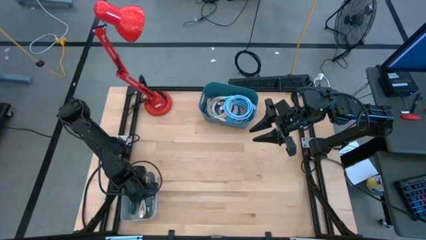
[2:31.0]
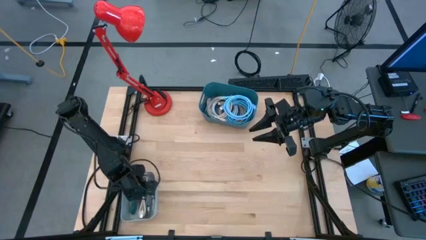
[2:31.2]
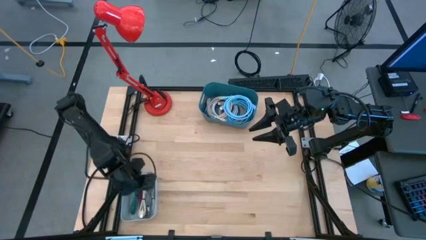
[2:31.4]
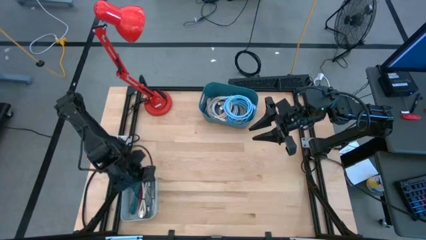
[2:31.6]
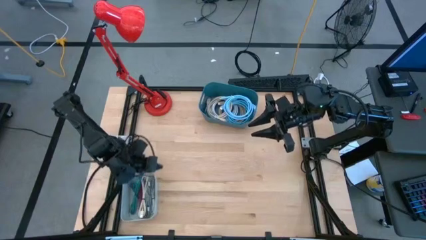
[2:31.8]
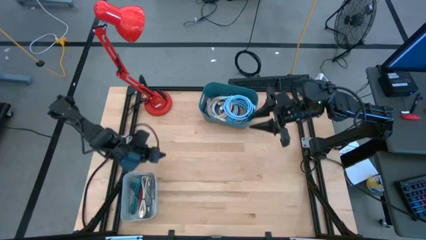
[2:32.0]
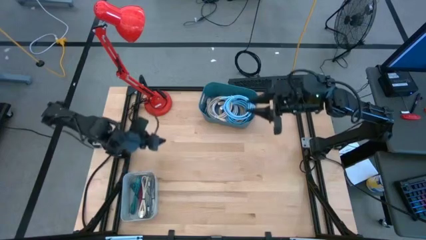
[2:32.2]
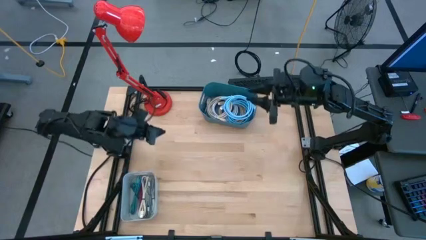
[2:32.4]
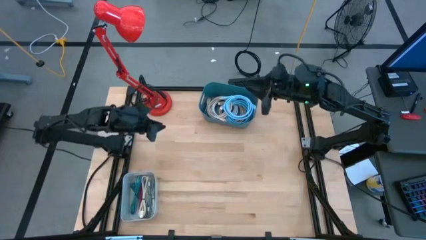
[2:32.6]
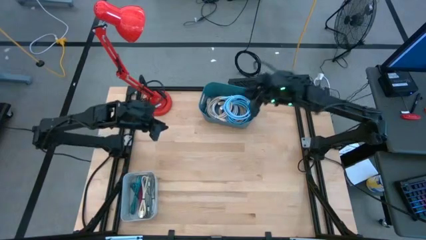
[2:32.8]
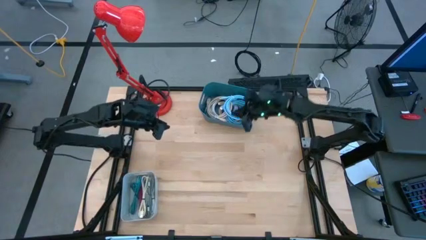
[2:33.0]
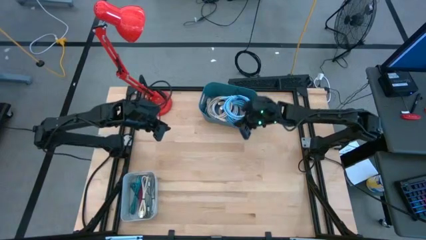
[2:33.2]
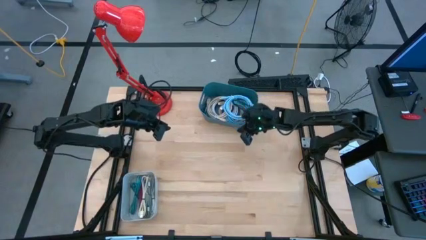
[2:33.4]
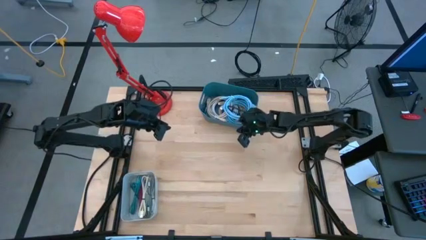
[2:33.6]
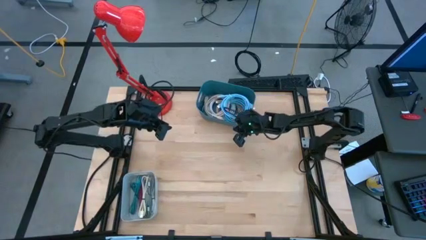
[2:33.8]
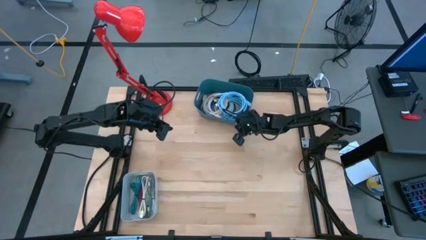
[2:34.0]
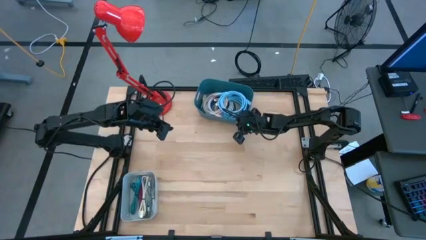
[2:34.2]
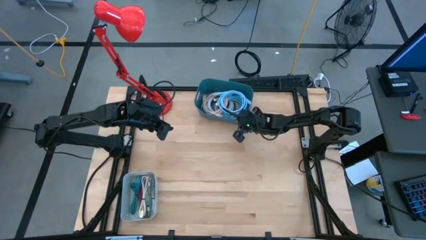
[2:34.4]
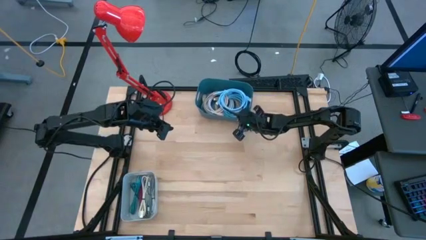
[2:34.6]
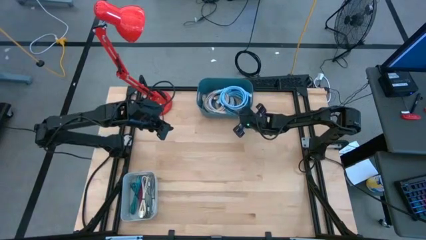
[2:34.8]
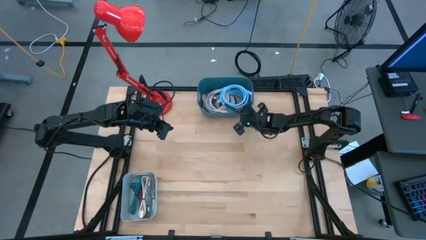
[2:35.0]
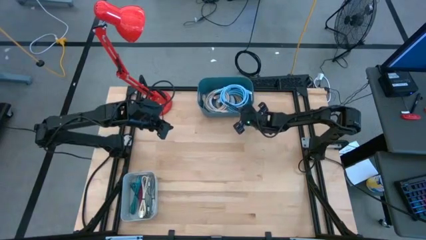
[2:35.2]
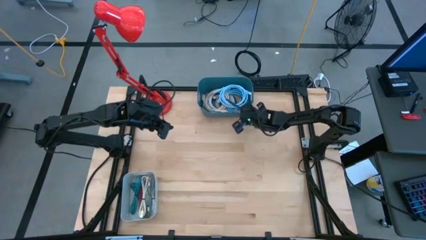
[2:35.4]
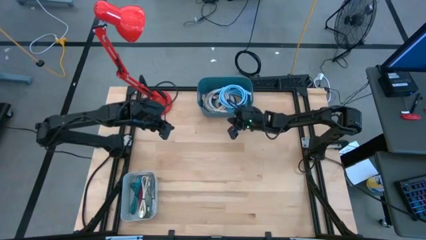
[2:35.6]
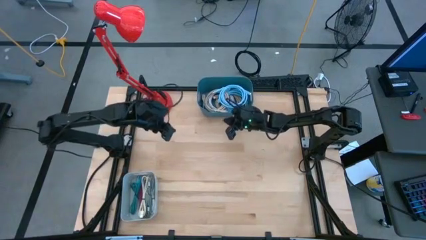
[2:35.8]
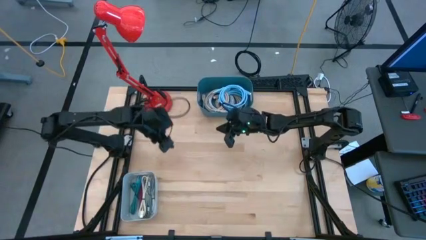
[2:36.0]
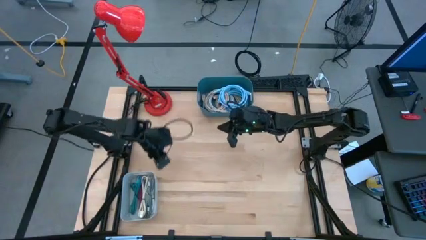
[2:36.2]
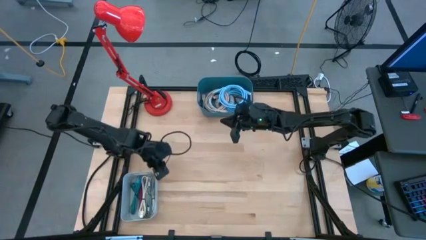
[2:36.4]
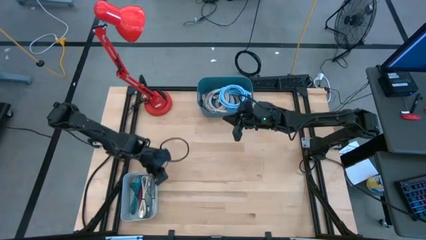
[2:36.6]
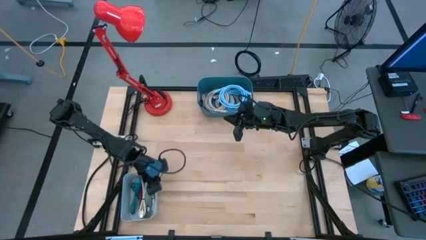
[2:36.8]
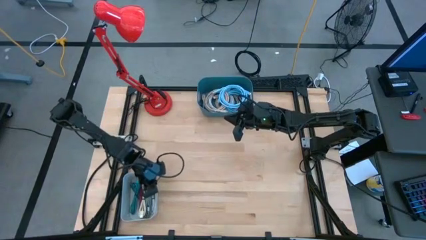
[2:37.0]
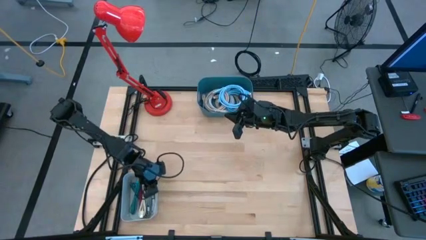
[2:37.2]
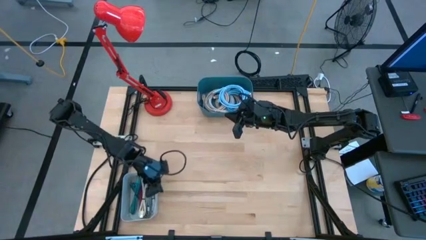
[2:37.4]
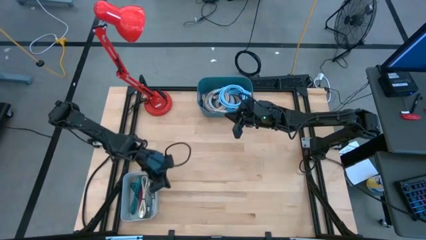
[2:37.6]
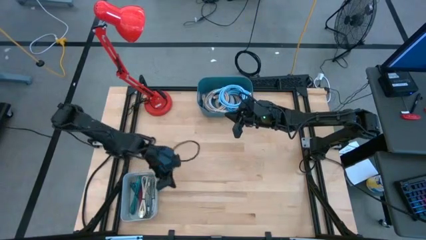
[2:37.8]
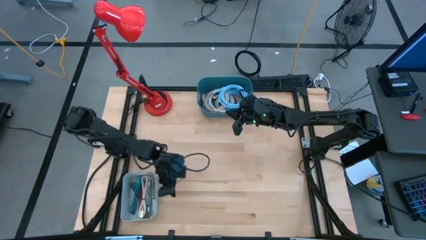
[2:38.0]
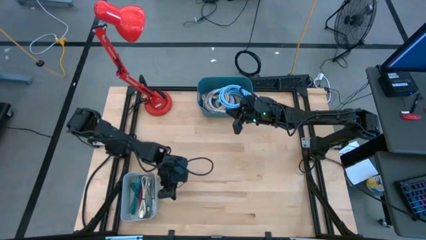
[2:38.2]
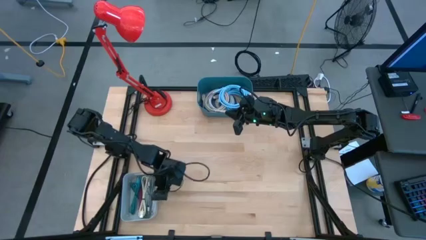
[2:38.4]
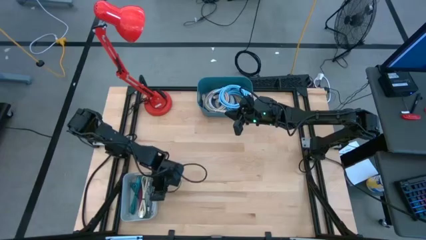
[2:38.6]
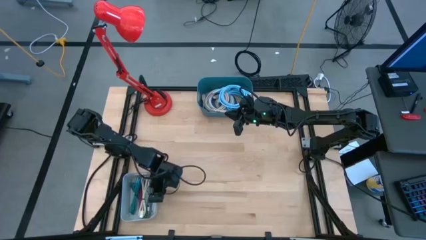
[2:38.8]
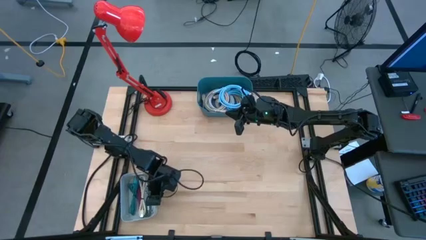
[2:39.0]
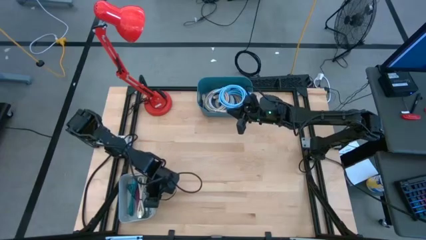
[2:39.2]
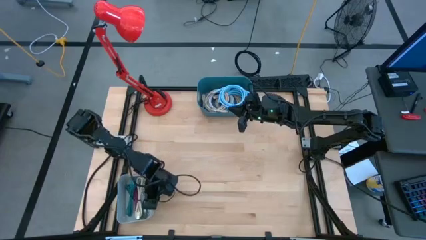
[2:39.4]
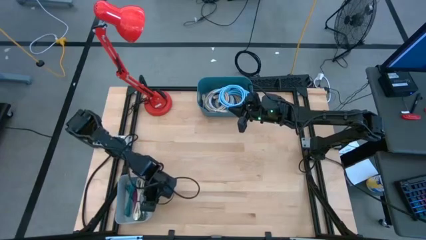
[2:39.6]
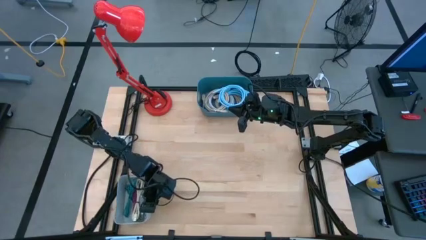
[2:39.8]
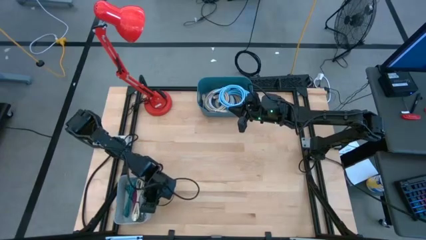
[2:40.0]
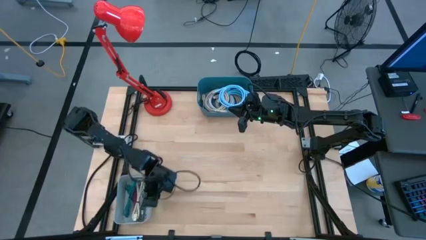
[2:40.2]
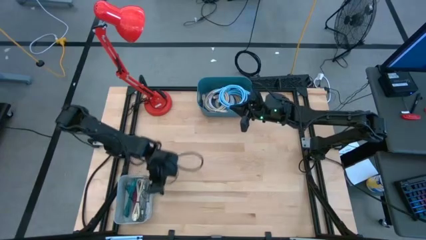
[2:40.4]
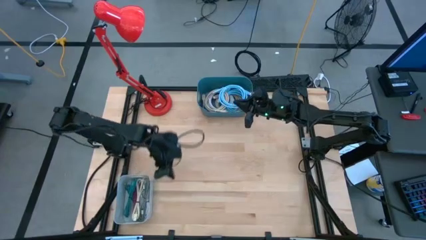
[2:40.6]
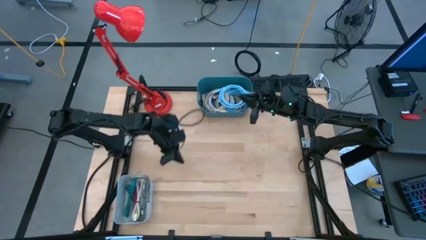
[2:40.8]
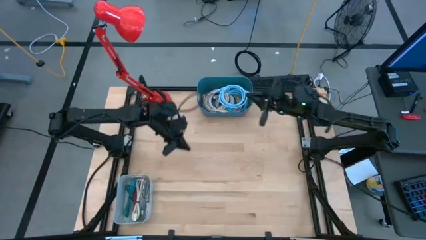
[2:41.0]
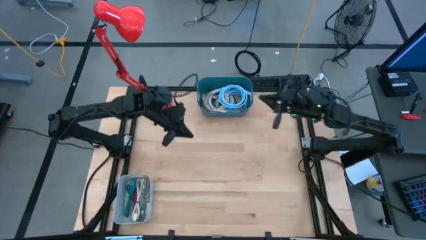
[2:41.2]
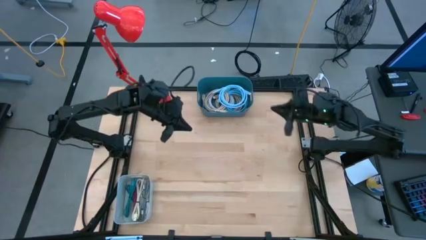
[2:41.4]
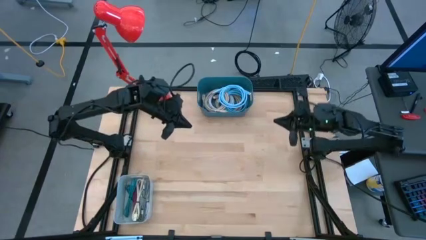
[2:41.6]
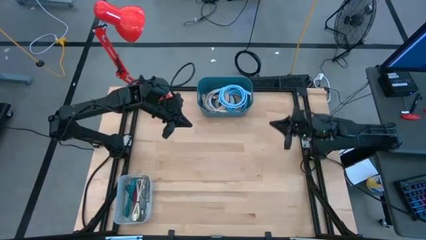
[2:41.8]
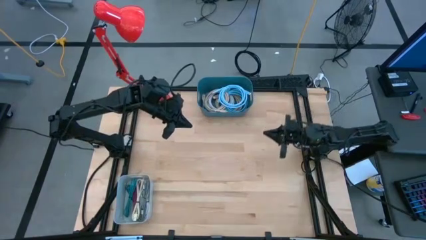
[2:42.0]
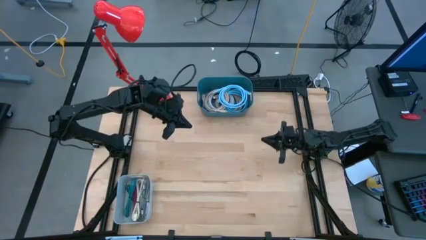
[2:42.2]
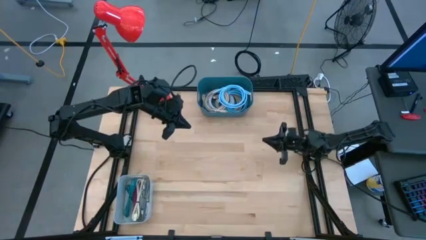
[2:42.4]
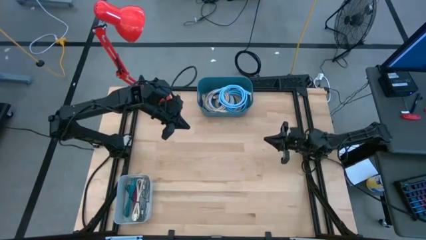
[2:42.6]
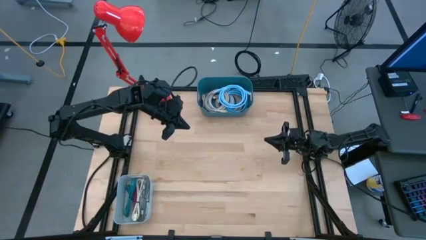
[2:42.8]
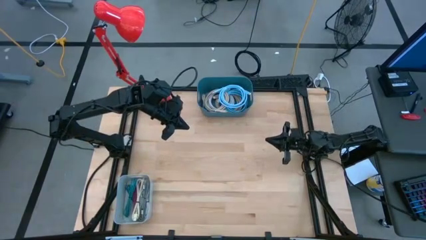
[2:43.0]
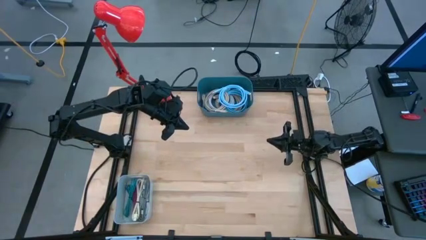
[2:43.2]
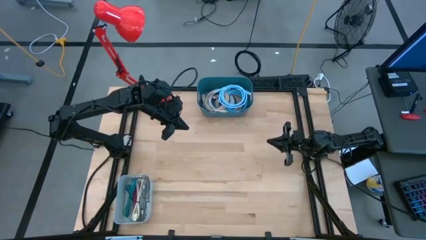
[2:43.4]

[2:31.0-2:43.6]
Task: Pick & Place USB Port
Return to Home Position

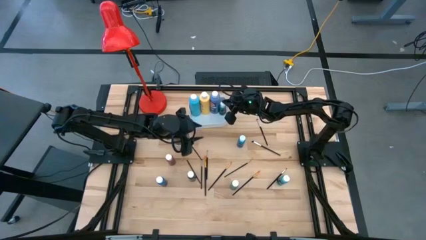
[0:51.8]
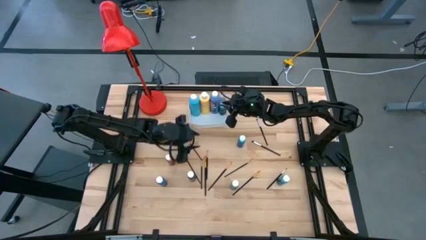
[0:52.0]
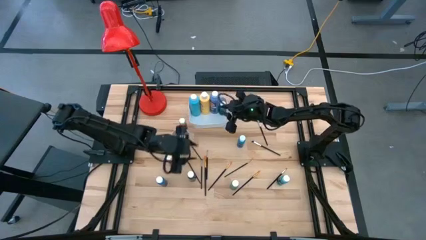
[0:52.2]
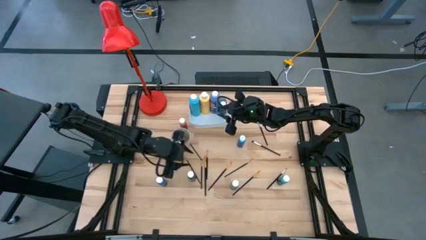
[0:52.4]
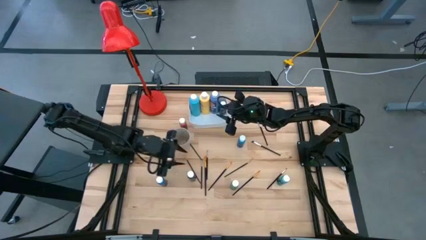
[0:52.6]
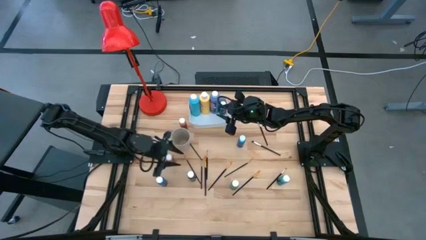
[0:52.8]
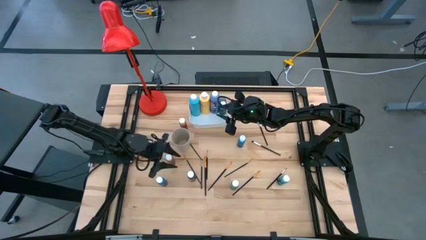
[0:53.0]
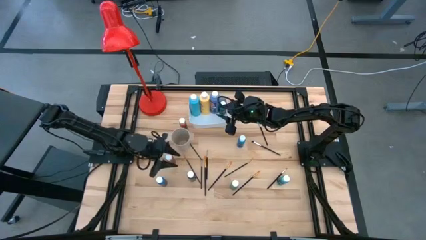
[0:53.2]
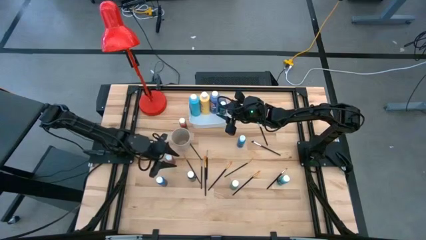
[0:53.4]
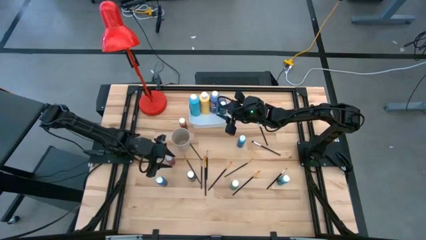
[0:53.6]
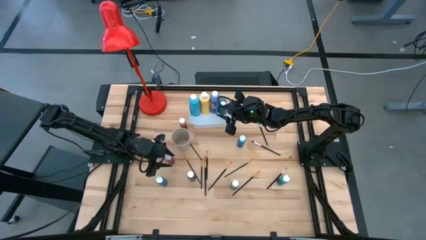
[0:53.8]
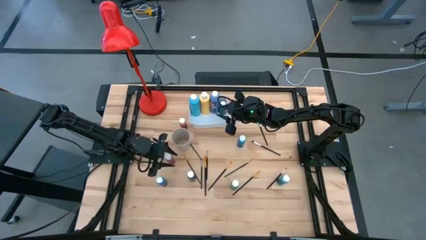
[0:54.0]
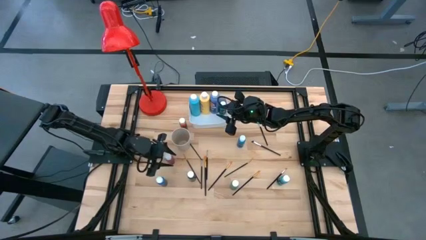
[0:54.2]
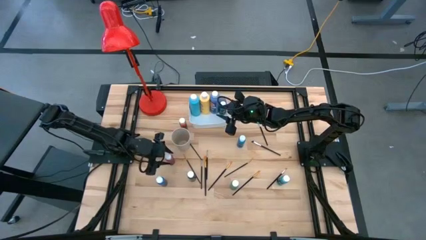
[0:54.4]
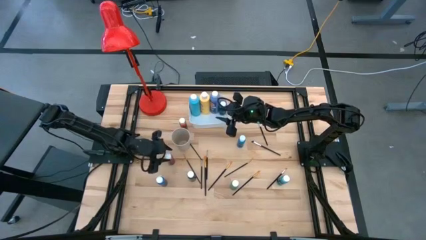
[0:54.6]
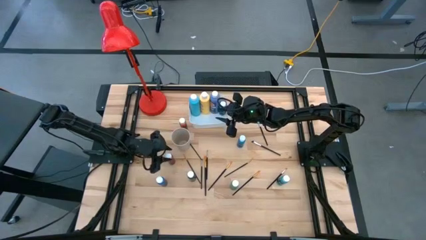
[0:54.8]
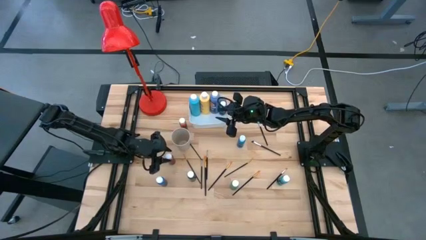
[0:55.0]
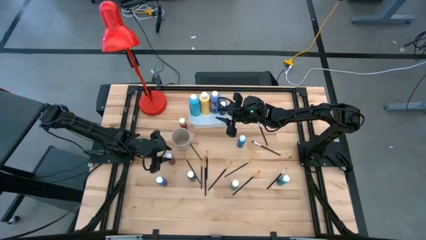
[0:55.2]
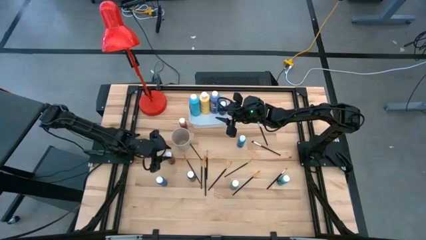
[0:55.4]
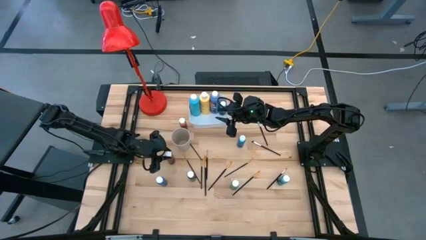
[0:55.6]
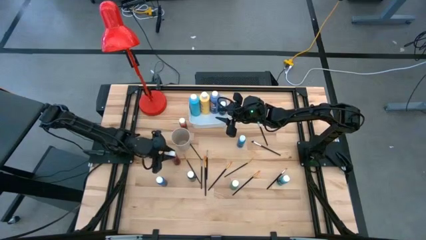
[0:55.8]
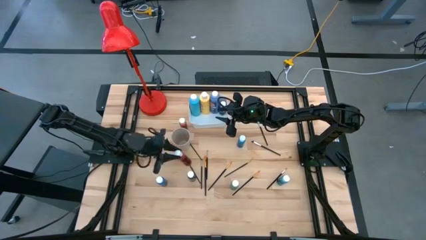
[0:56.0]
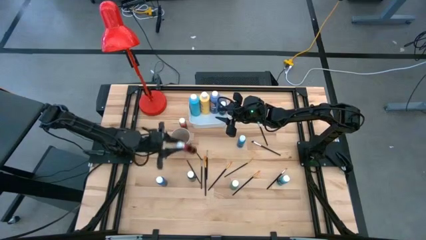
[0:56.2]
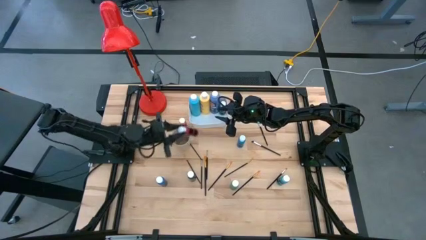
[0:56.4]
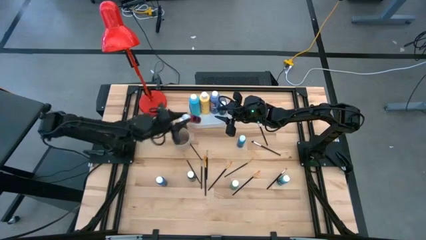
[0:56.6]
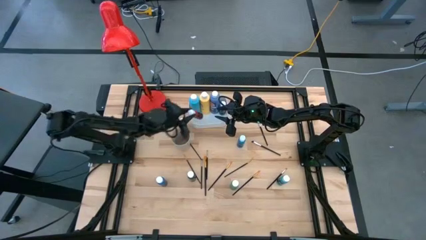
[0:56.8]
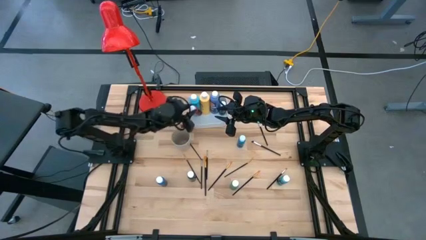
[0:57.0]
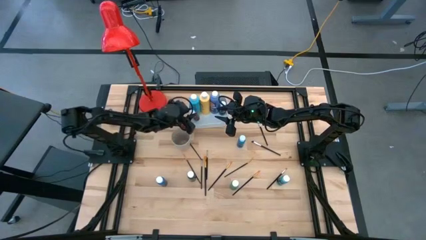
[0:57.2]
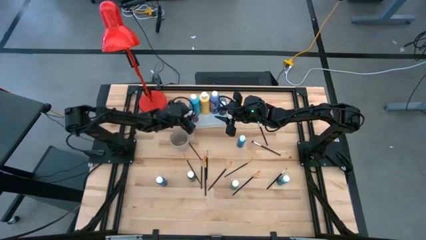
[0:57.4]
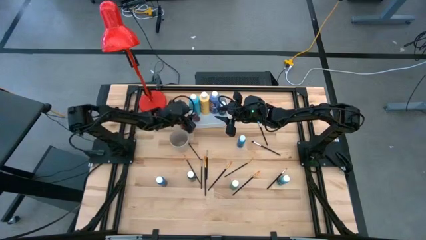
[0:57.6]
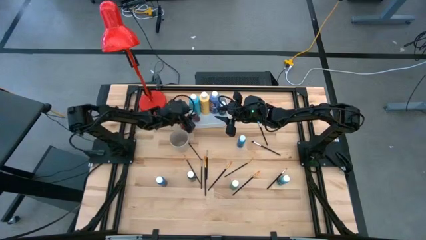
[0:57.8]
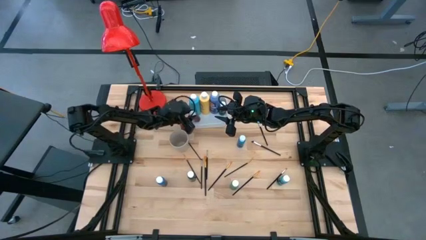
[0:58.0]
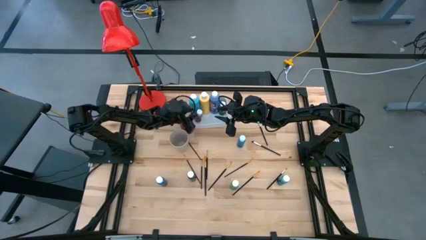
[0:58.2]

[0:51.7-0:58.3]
Task: Pick & Place Paint Supplies
Put the red paint bottles into the white bin
